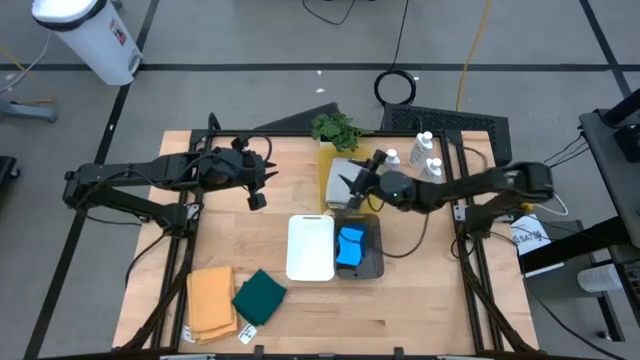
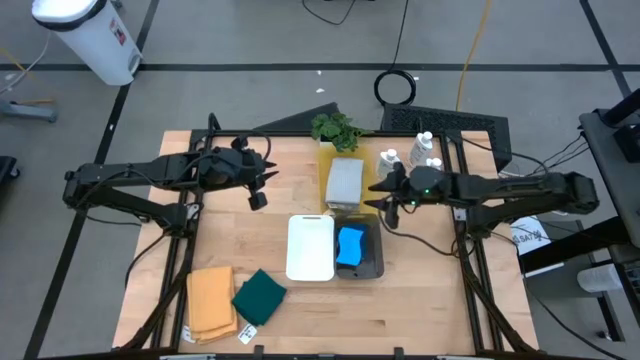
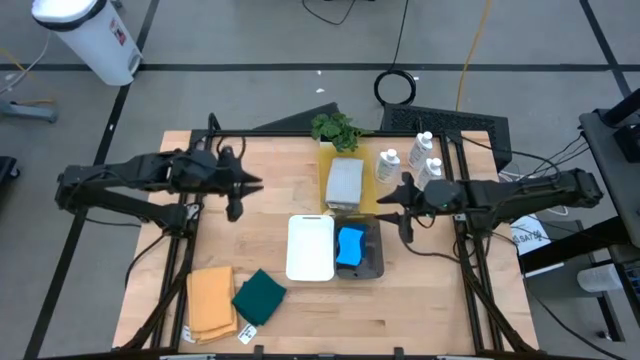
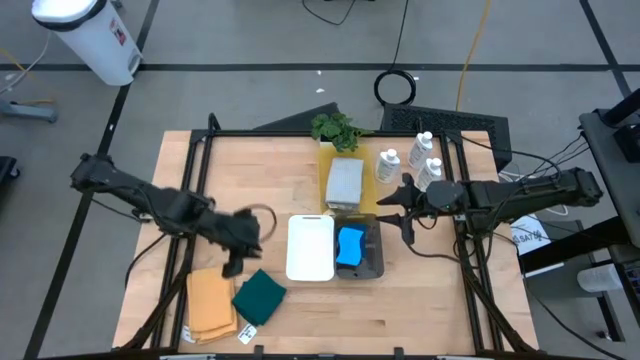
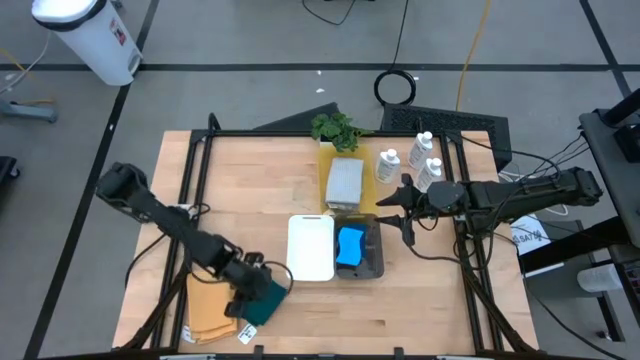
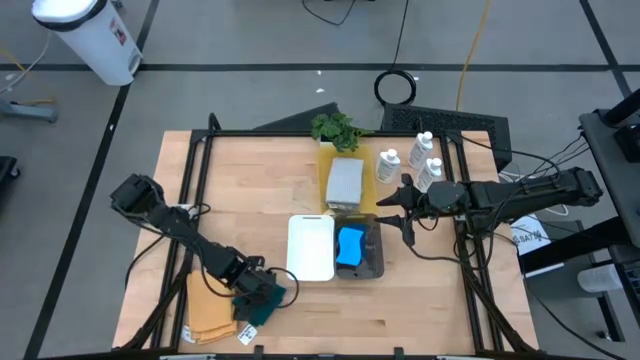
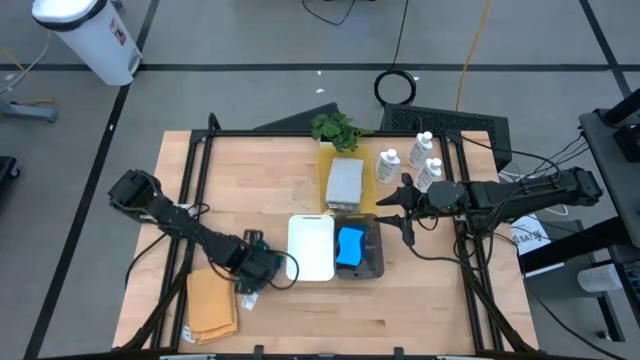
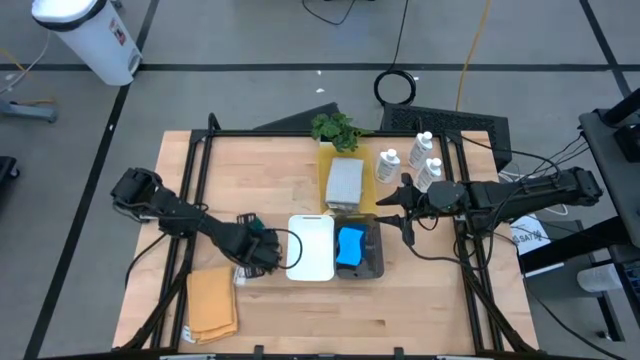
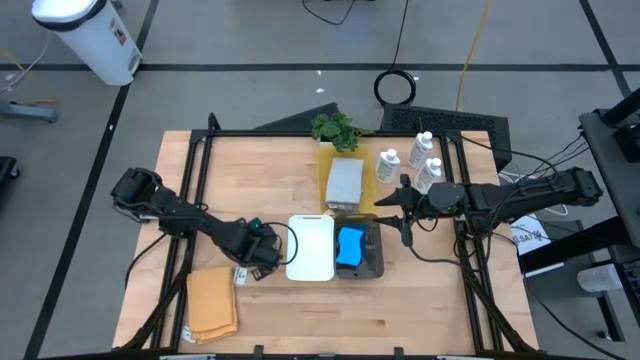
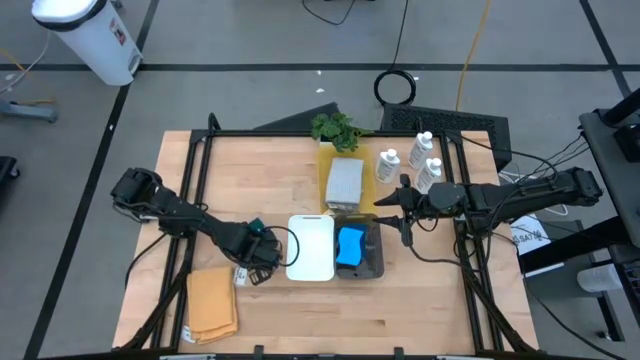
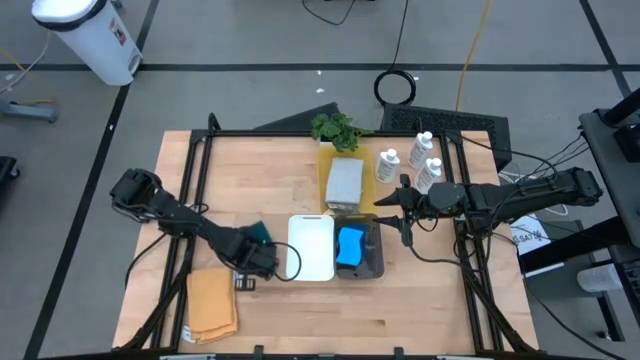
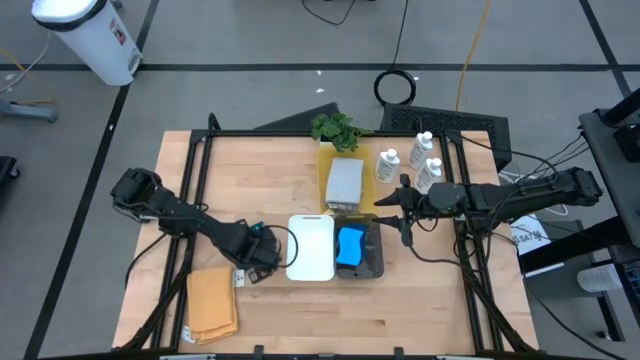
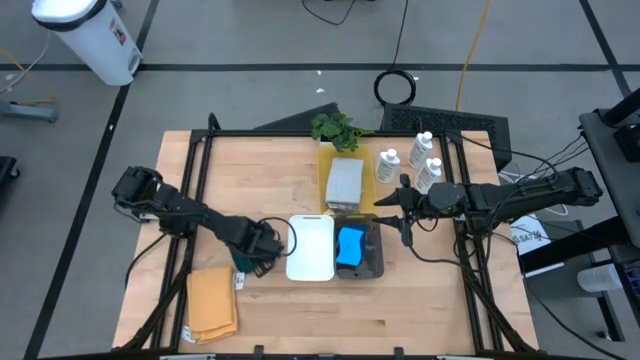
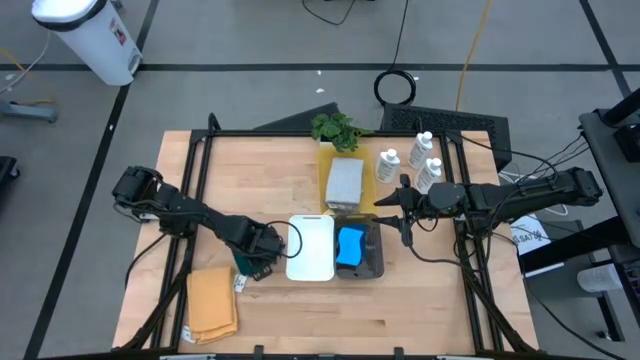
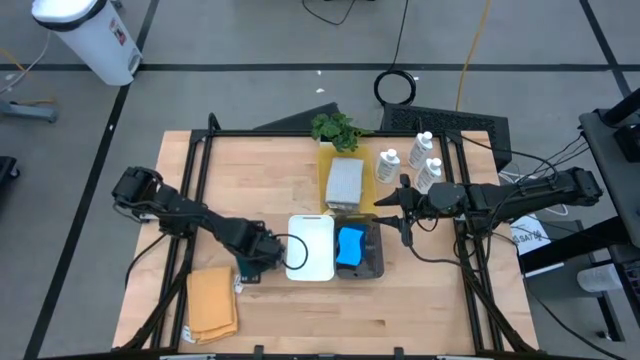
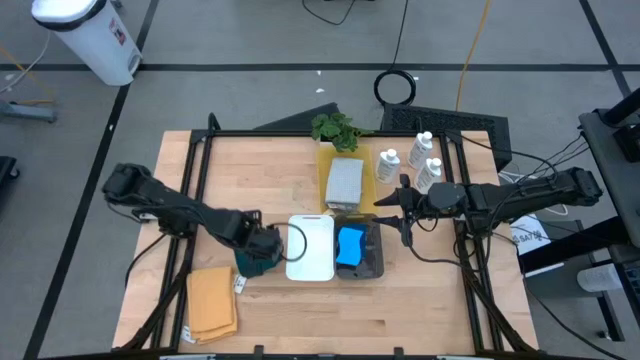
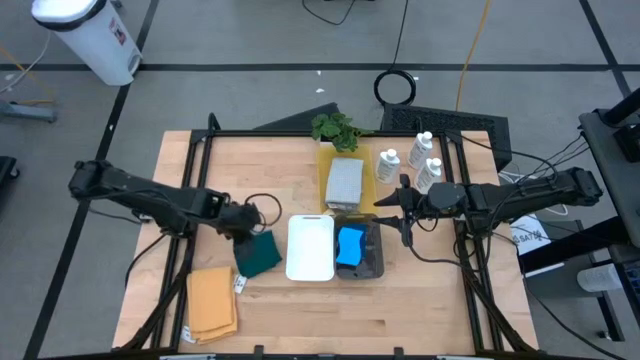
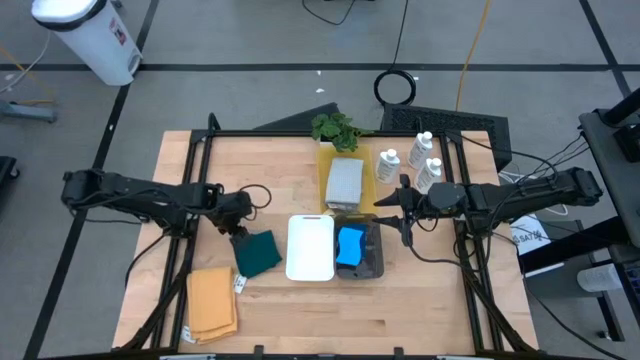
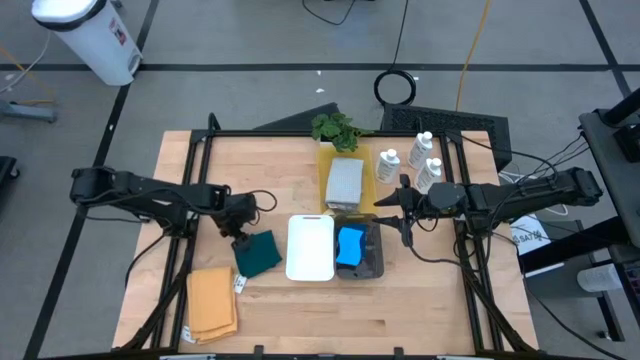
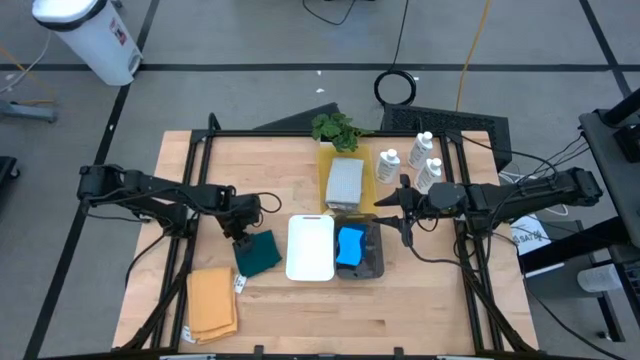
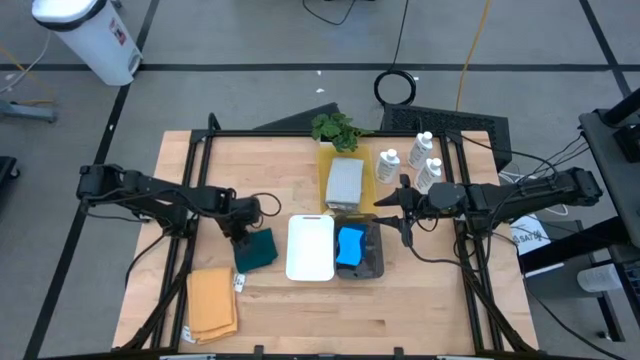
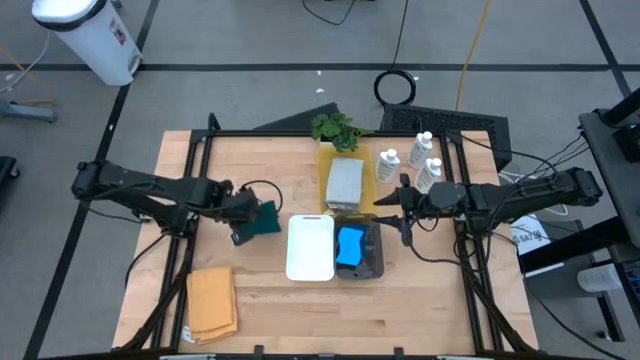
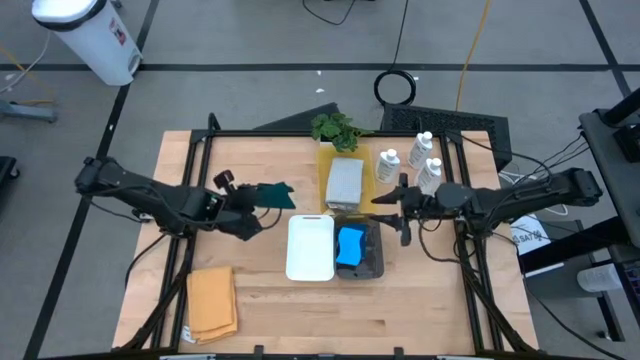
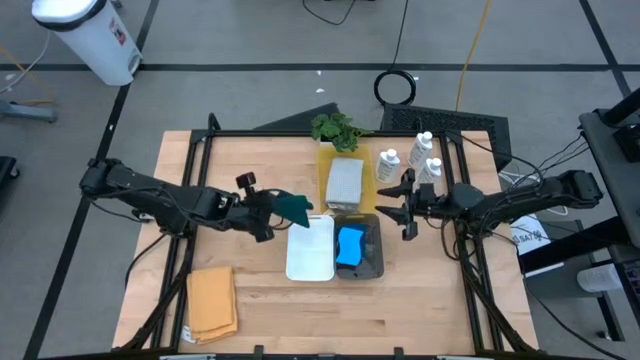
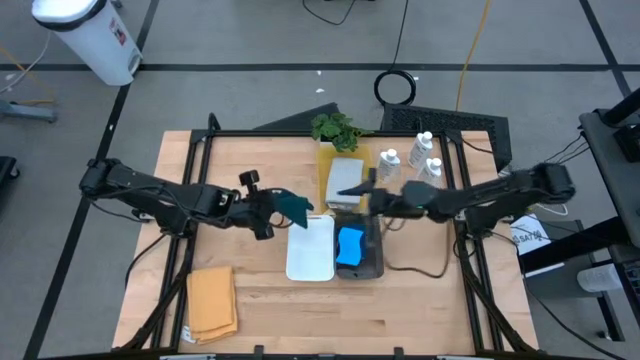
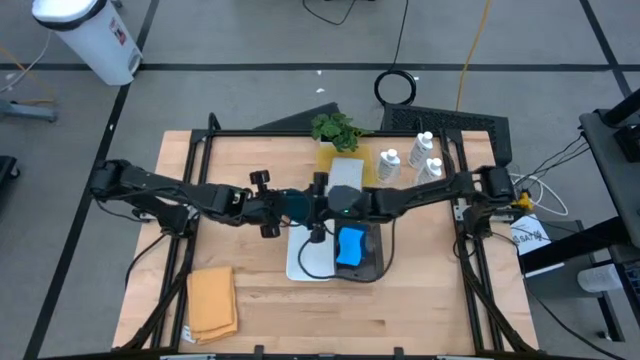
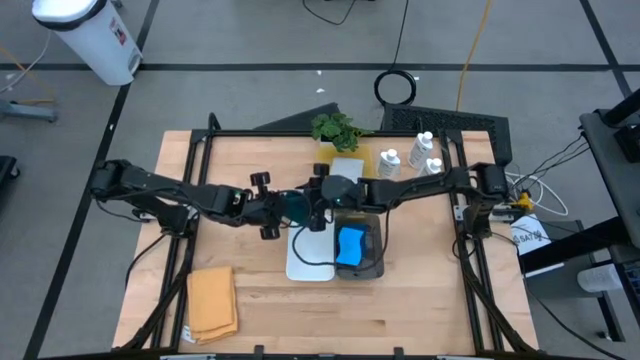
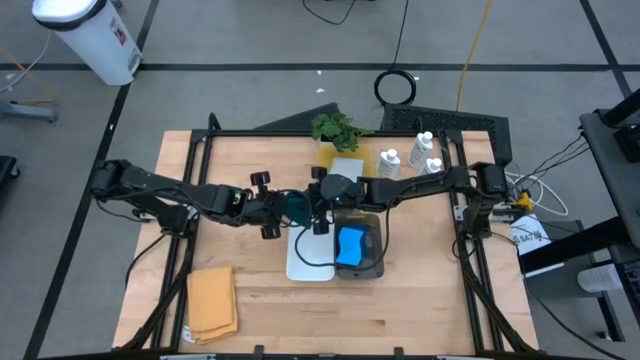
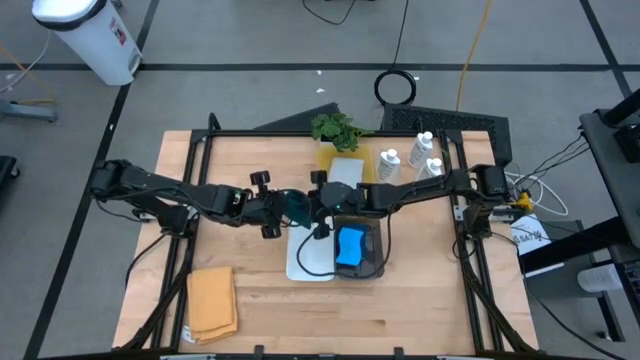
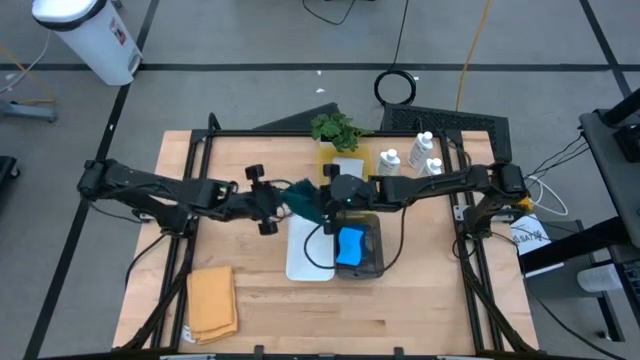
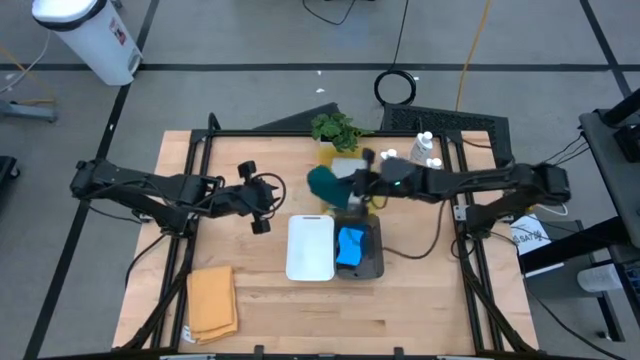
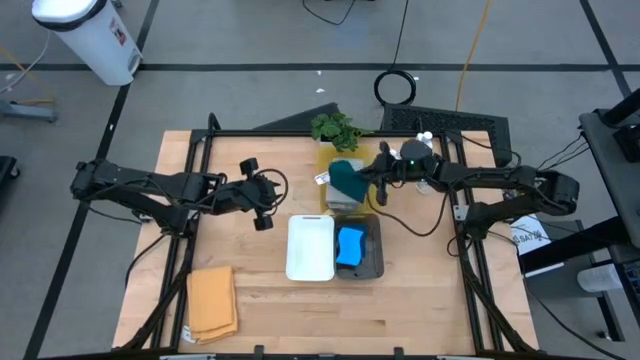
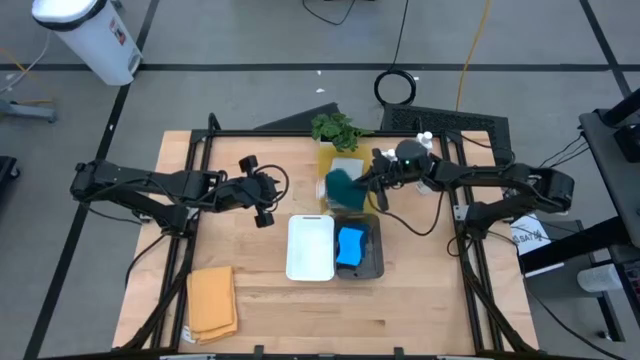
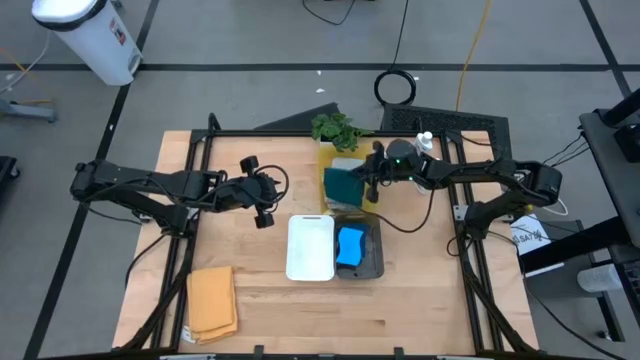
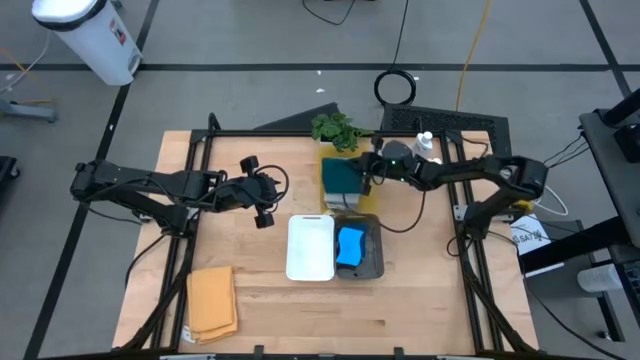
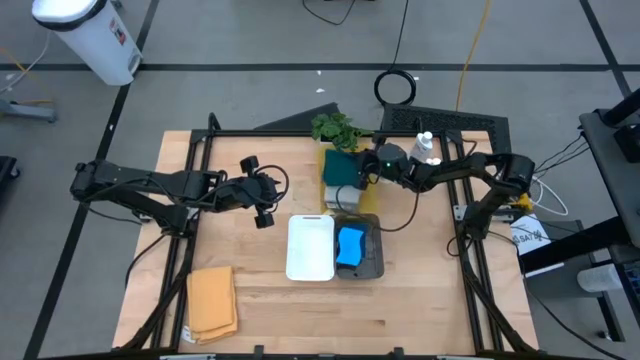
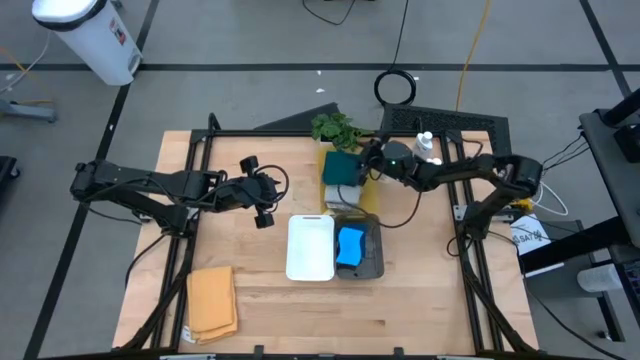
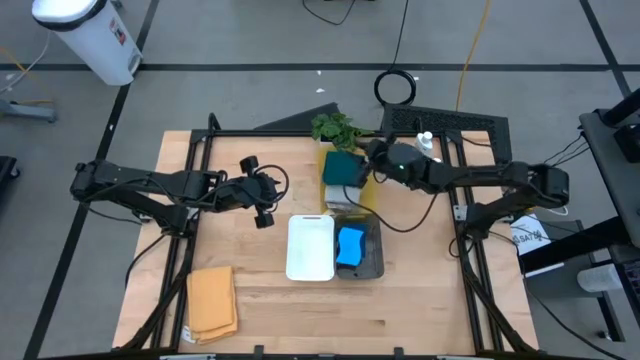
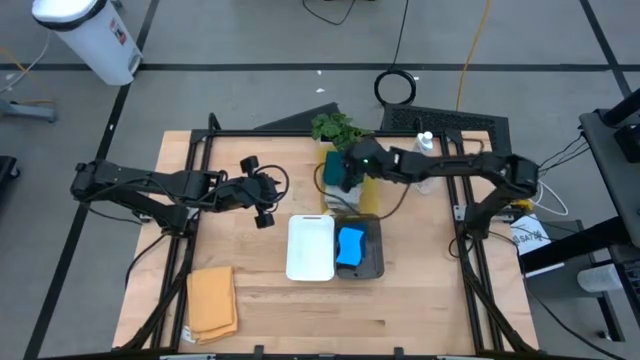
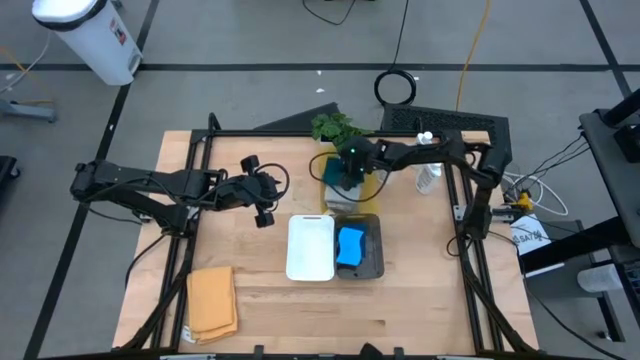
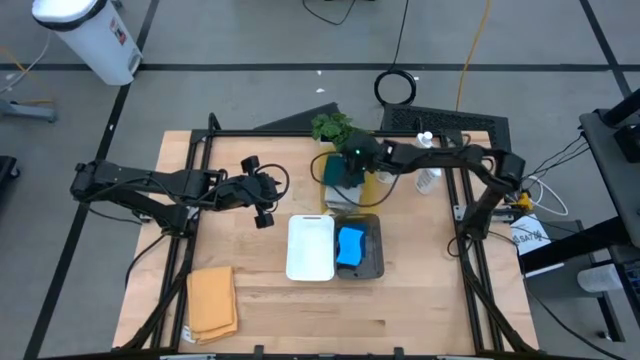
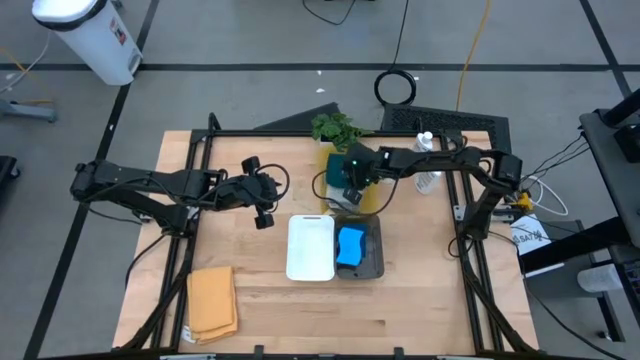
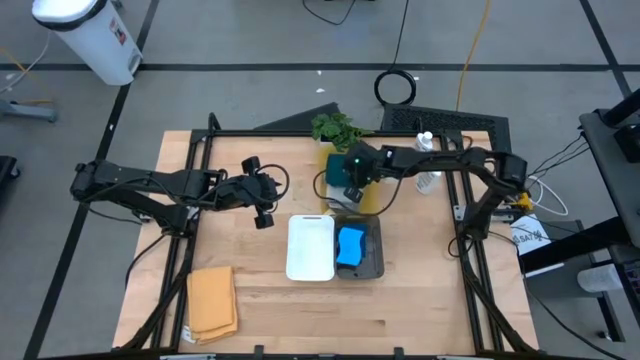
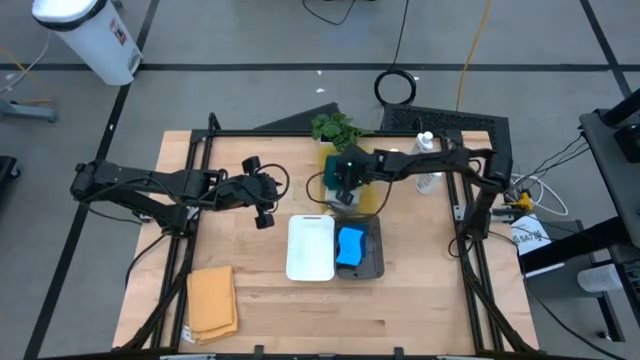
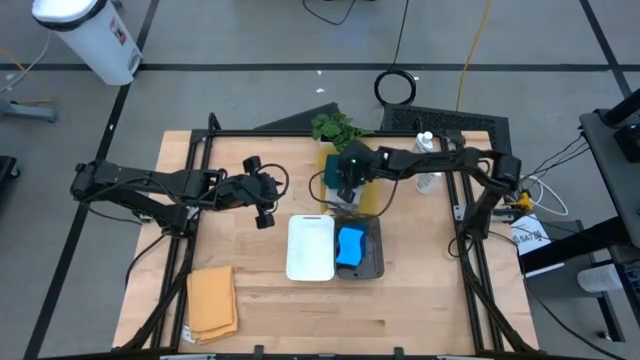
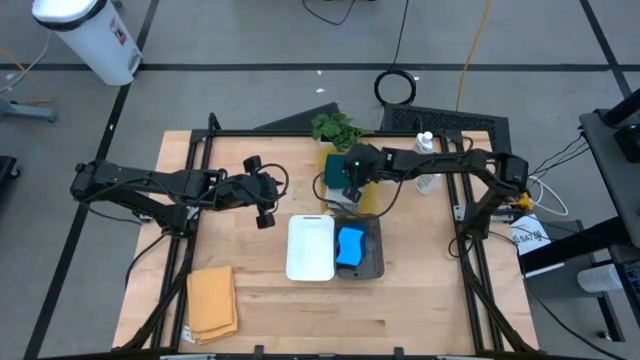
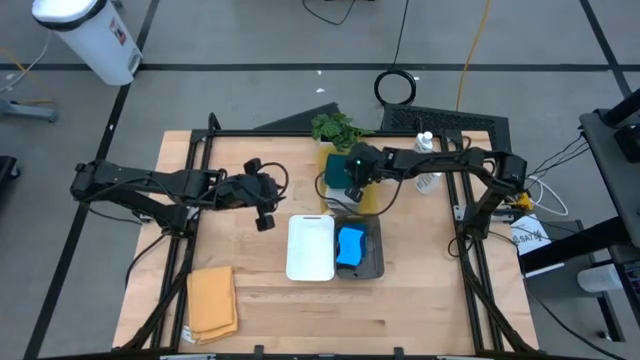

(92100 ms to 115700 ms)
Task: Pick & Place Kitchen Items
Put the dark green microfiber into the yellow bin
